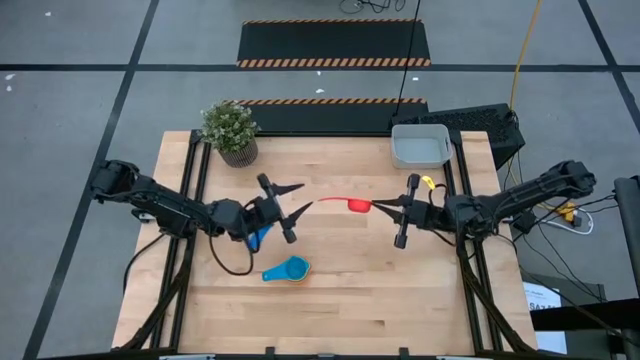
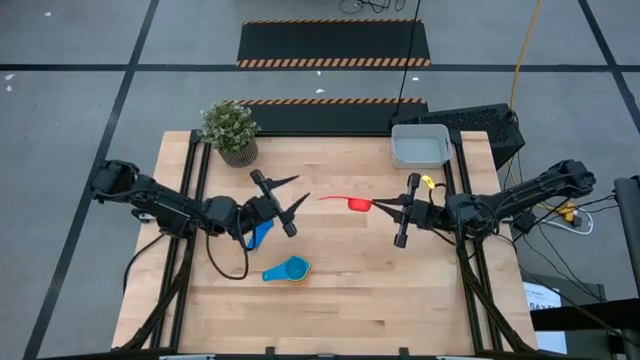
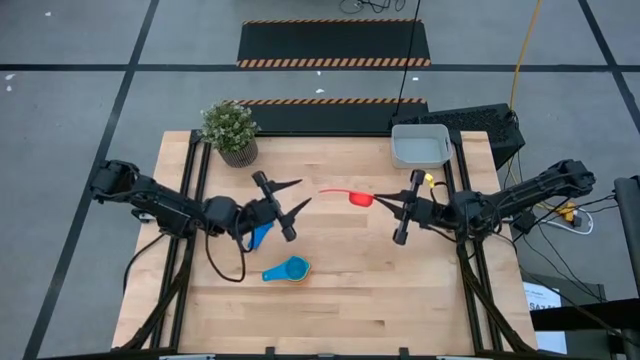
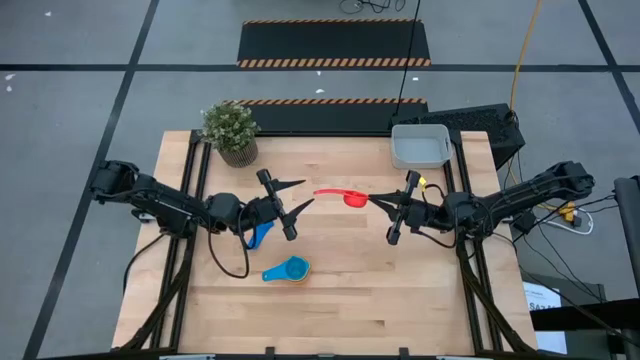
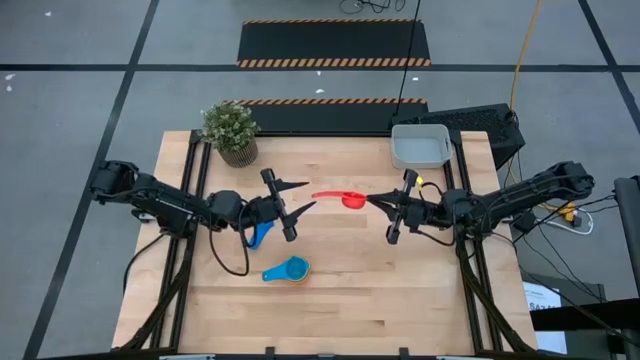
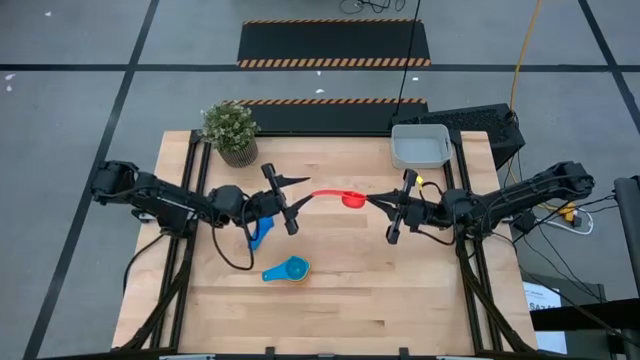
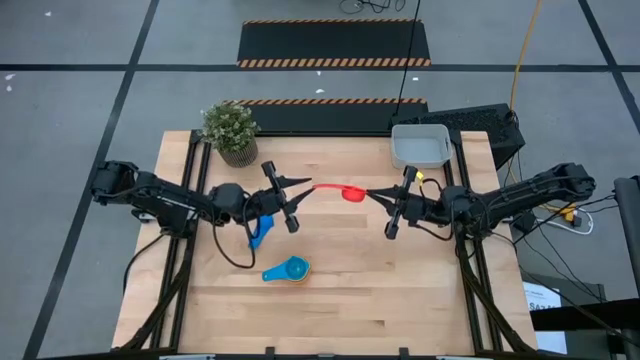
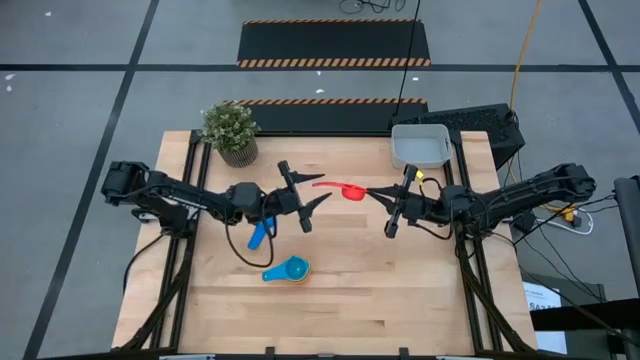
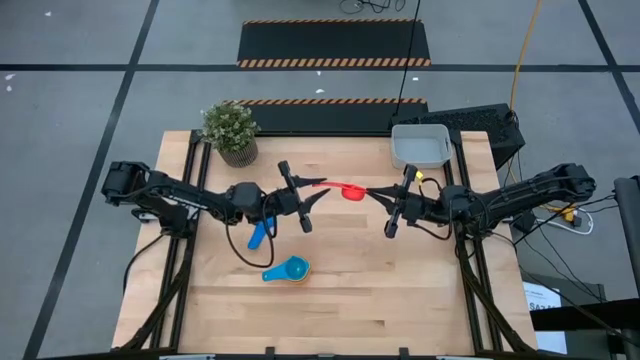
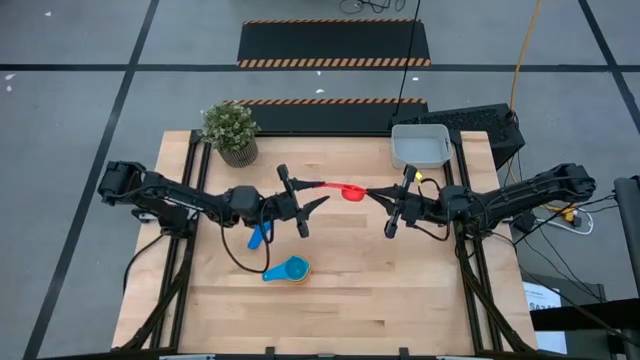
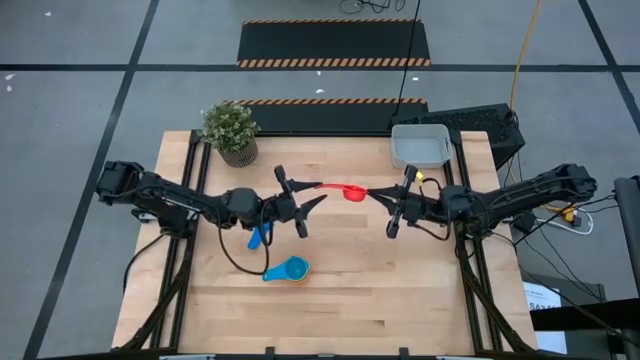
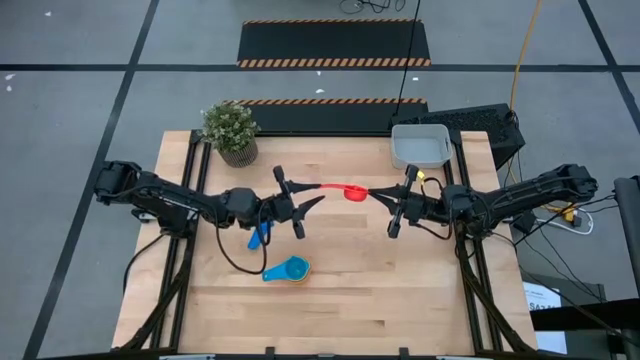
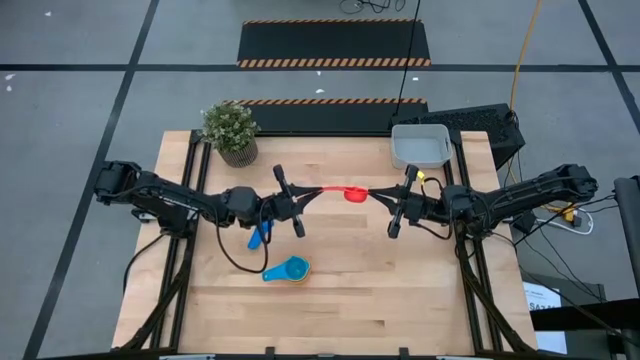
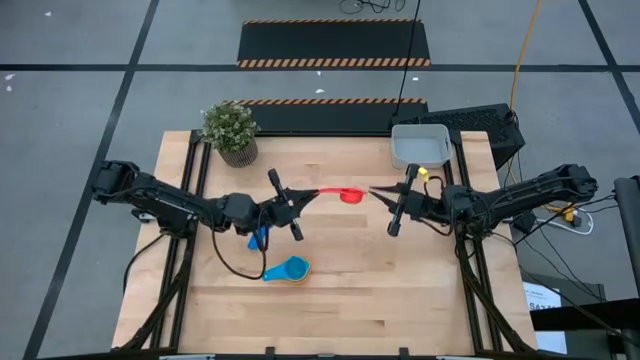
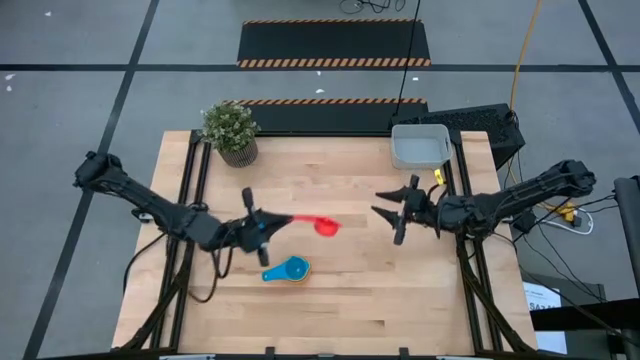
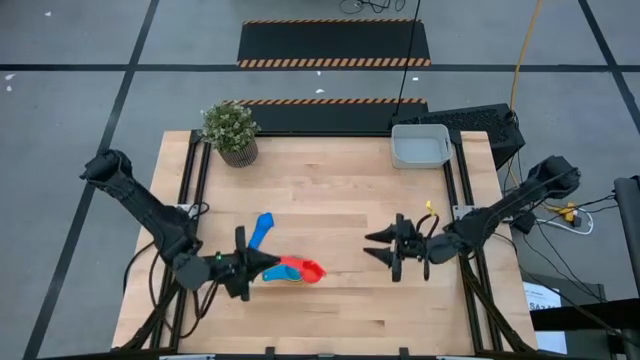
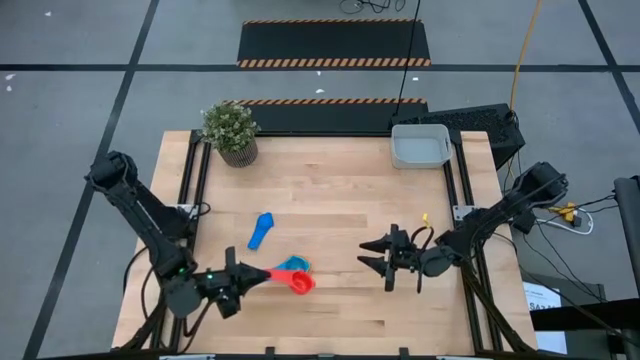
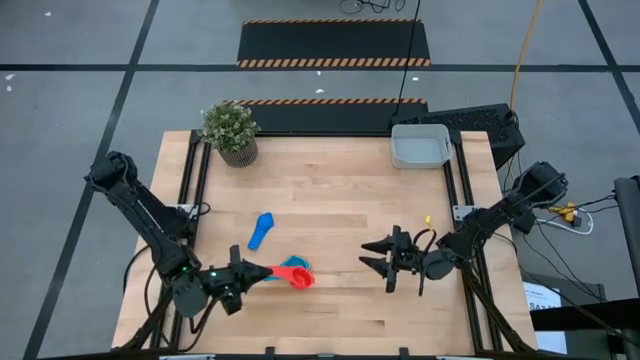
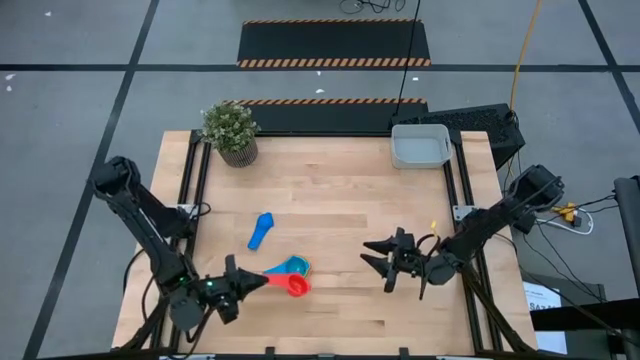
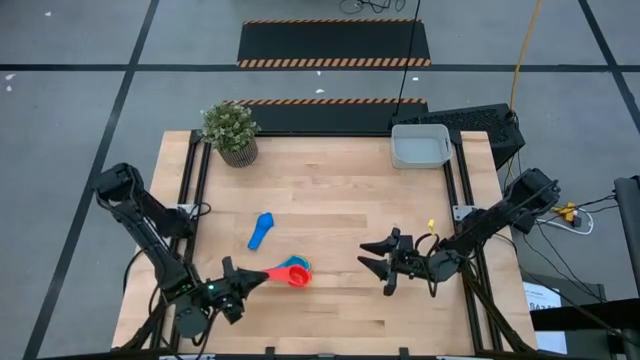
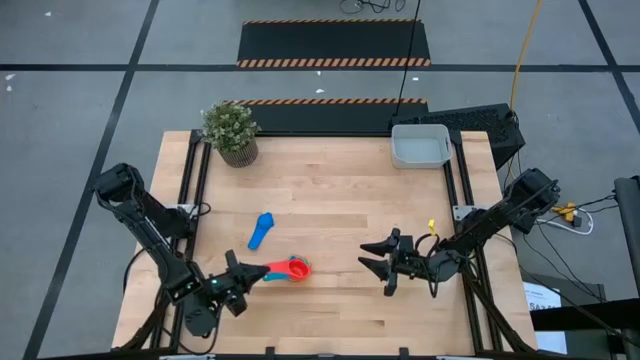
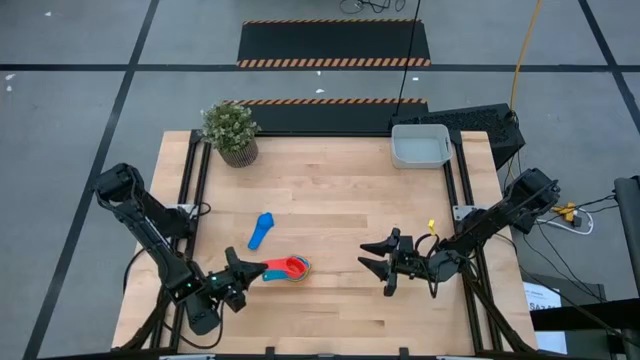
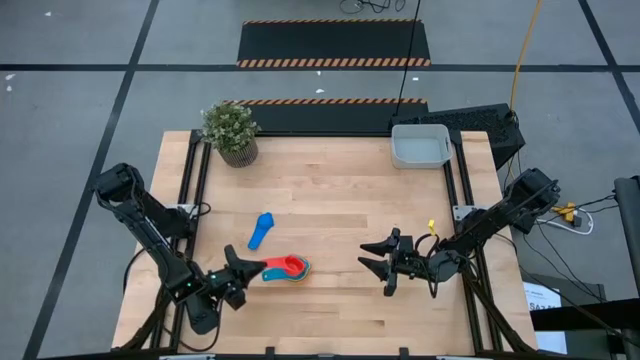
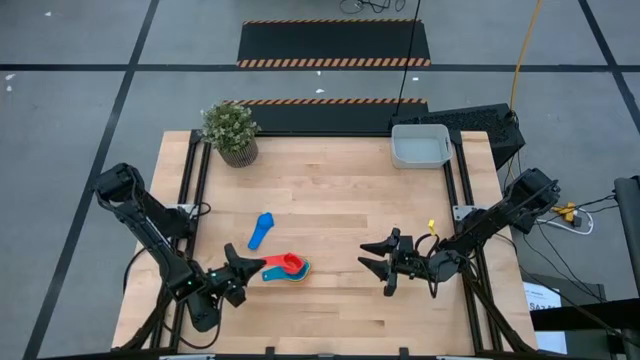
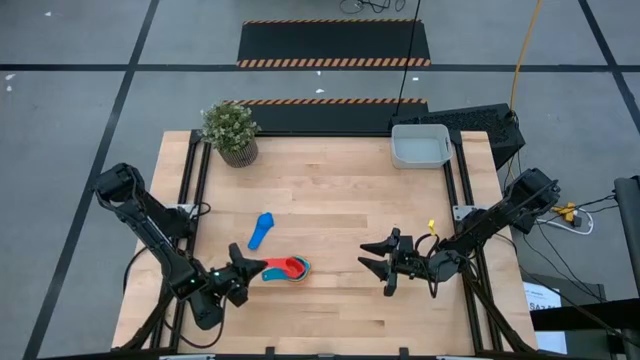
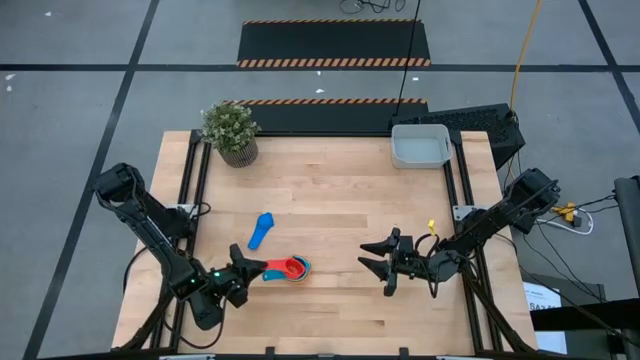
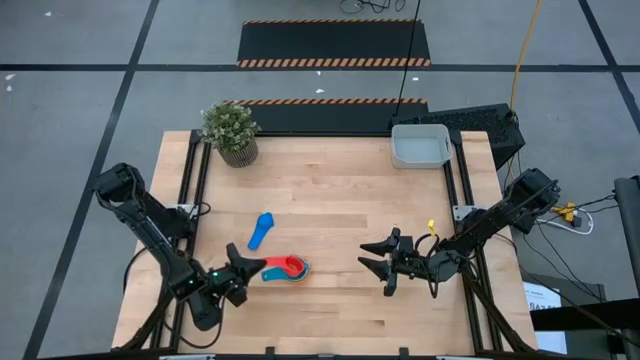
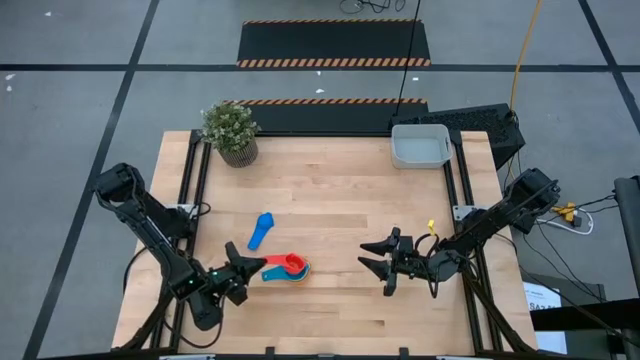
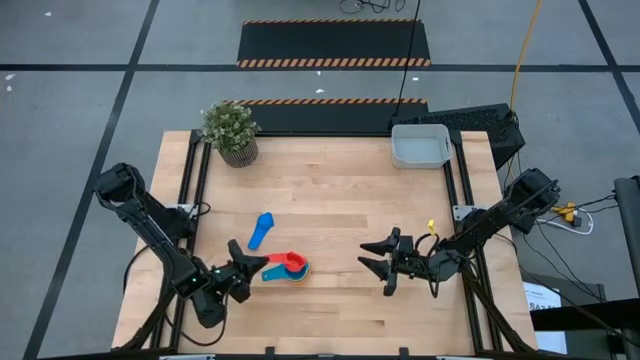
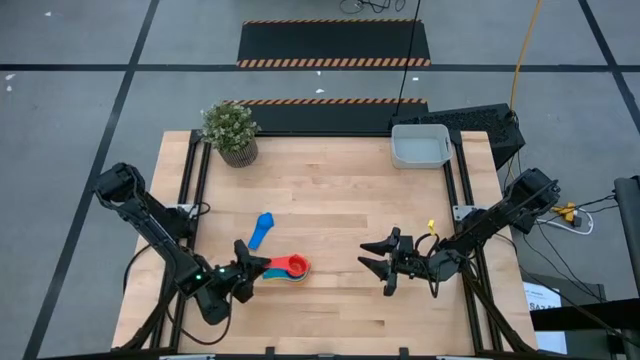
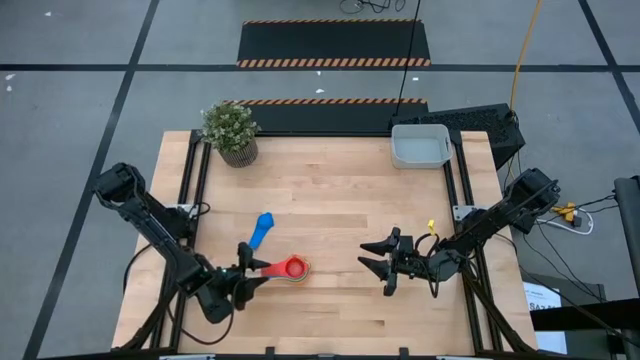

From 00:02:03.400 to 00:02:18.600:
Task: Nest measuring cups in basket
Stack the red measuring cup on the light blue measuring cup

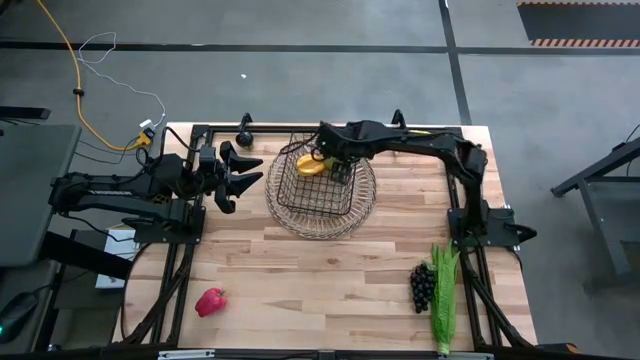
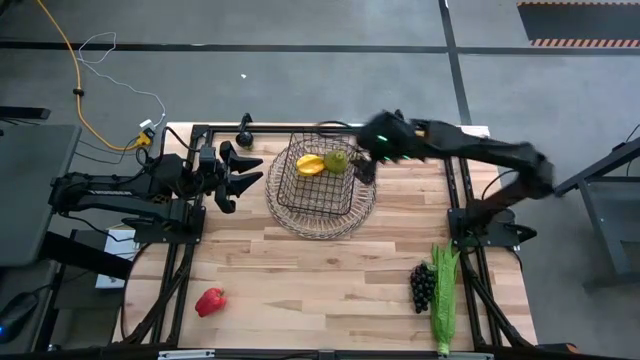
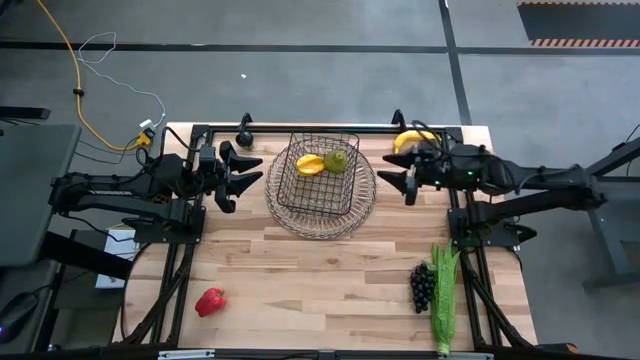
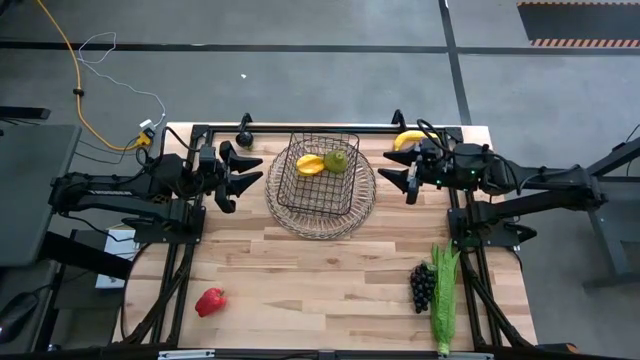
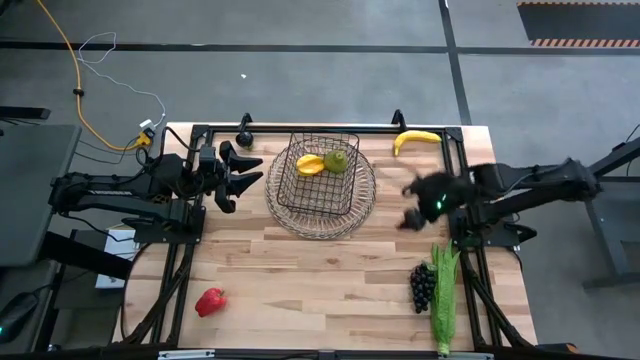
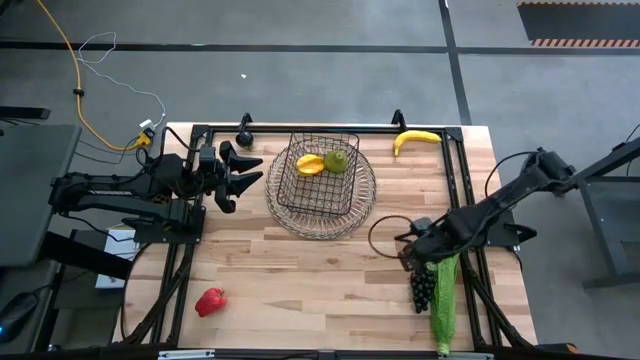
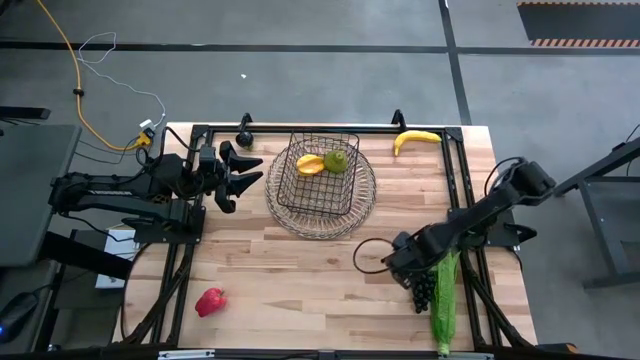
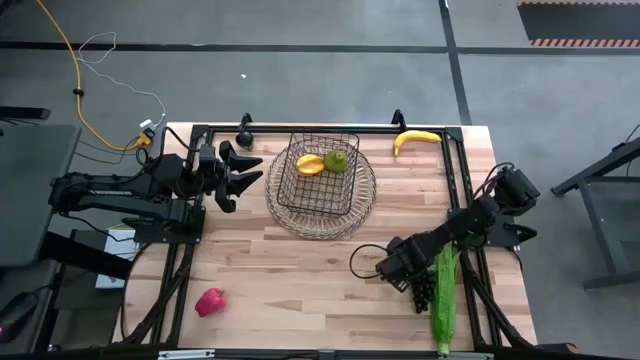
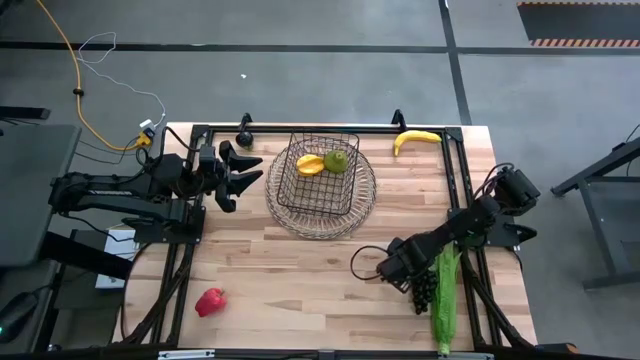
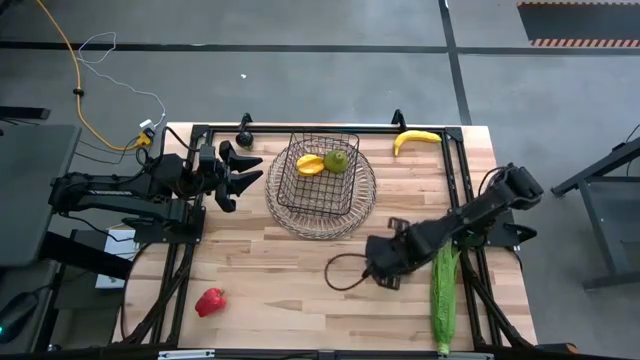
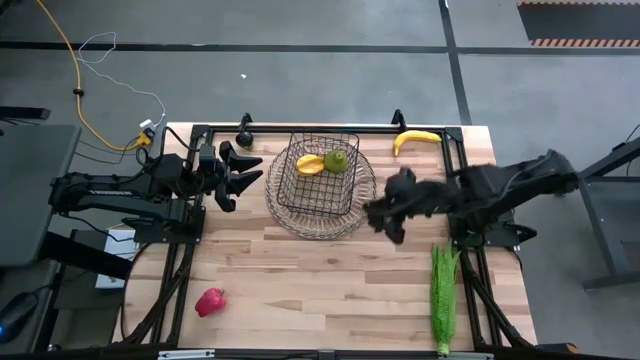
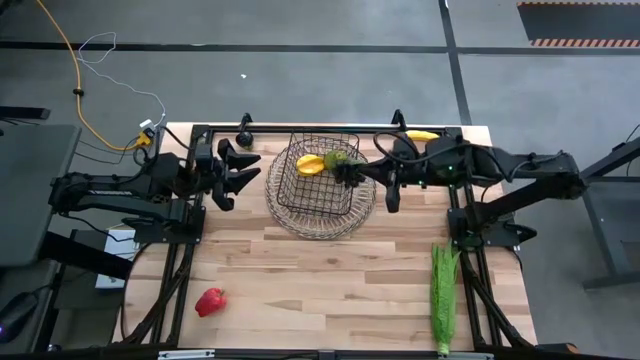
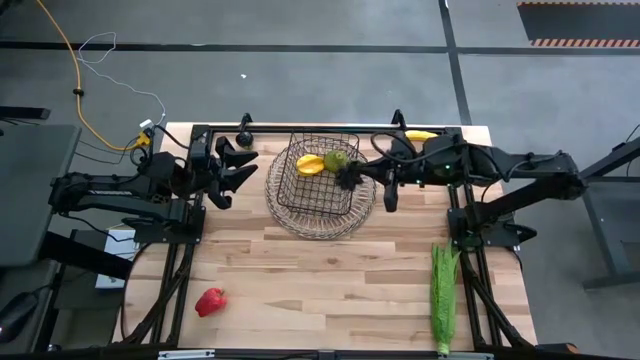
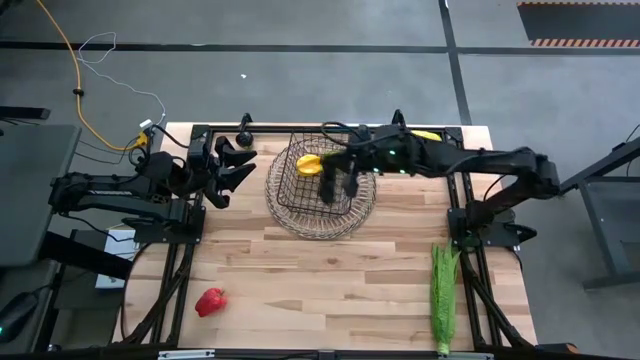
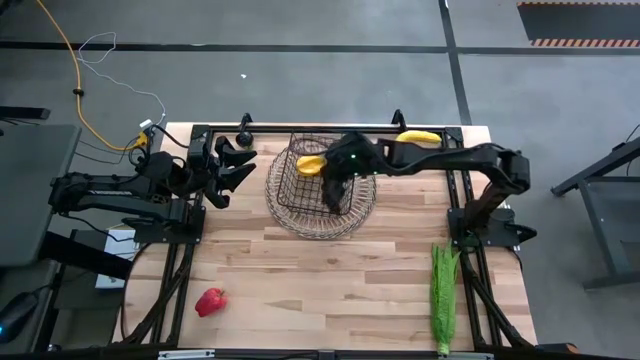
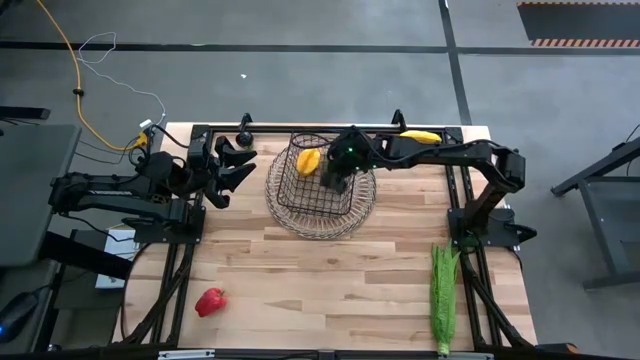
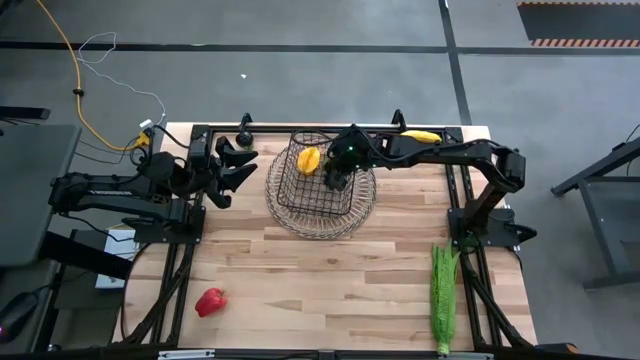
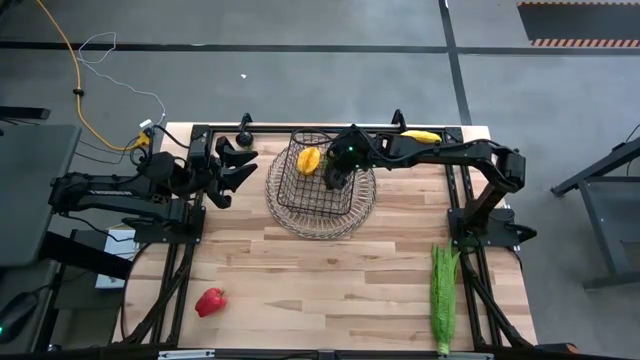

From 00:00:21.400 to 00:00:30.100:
Task: Build produce basket
Put the grapes into the wire basket
